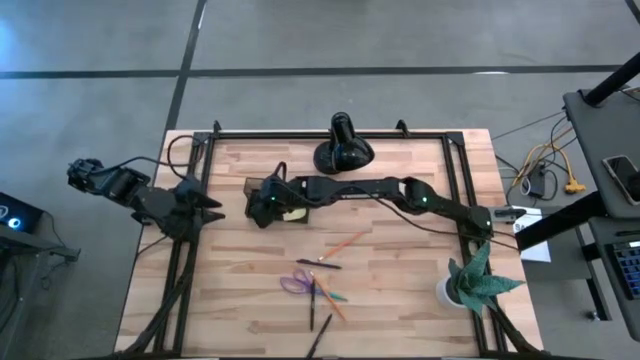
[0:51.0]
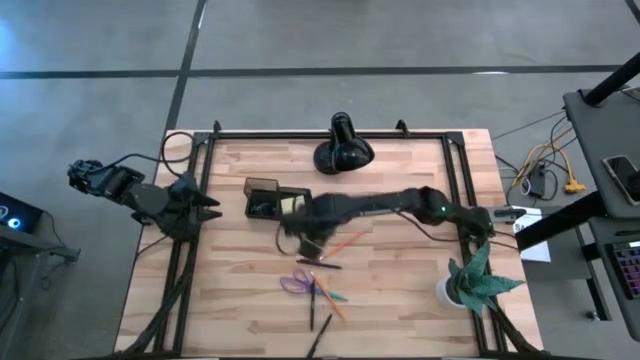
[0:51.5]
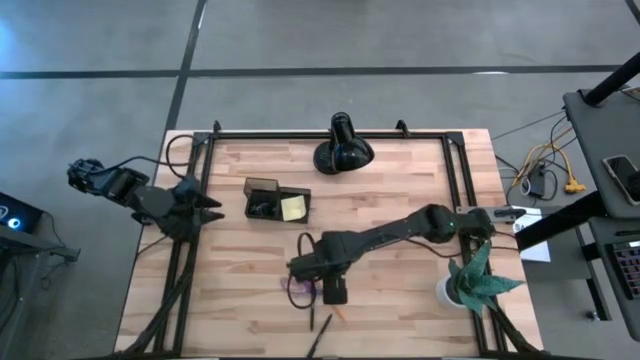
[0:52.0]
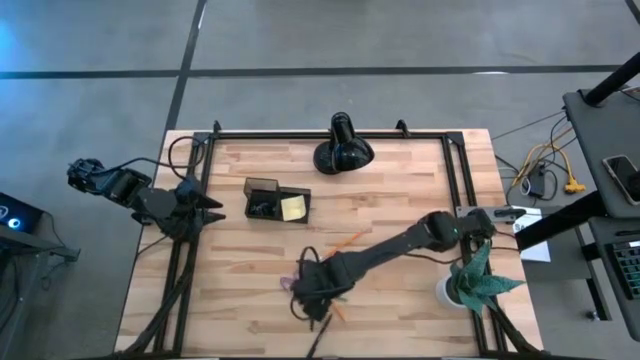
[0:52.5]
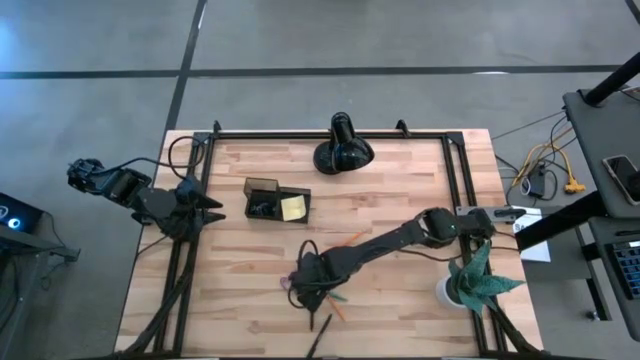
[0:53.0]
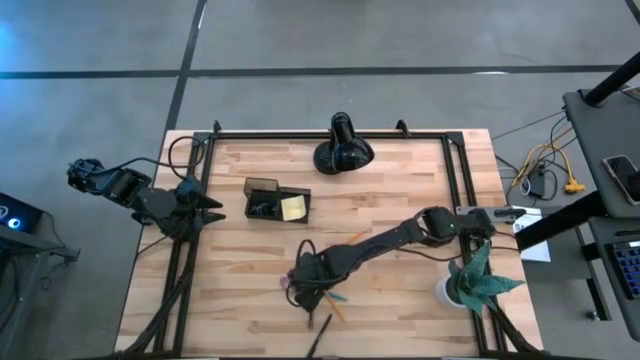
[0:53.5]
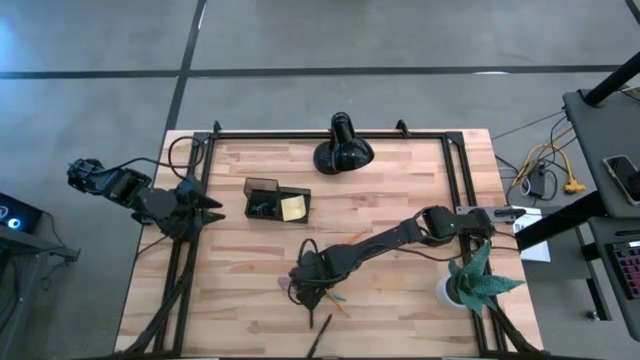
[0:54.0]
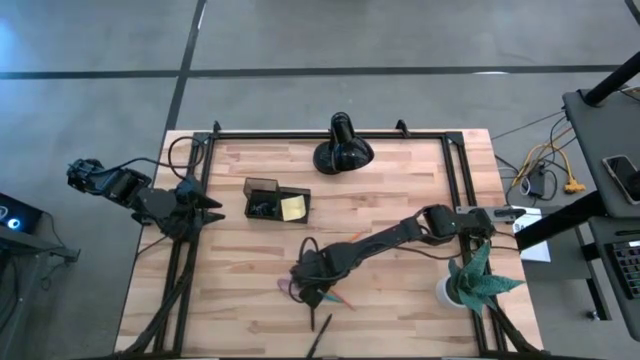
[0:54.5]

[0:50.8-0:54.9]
Task: Pick and place office supplies into organizer
Put the bottom yellow pencil into the black desk organizer

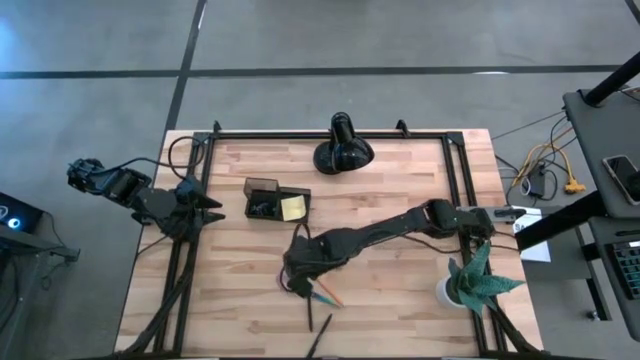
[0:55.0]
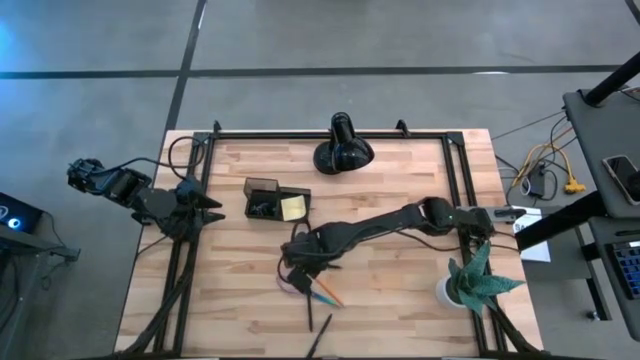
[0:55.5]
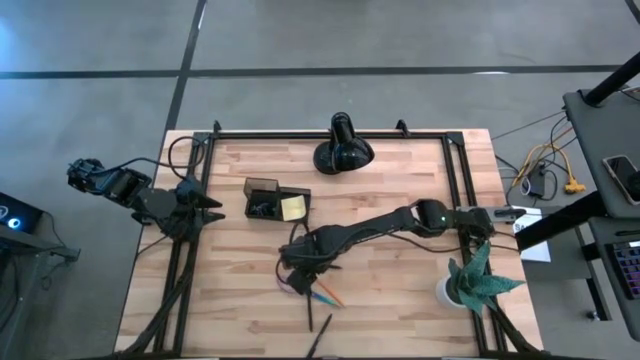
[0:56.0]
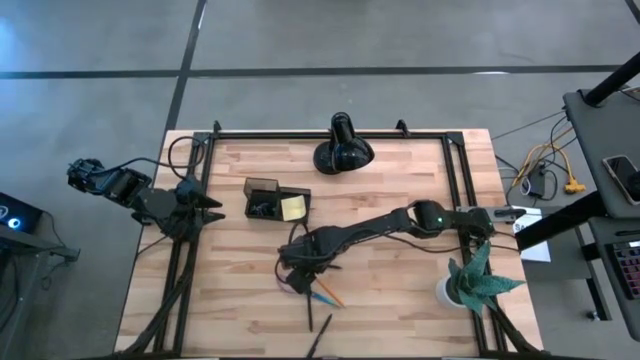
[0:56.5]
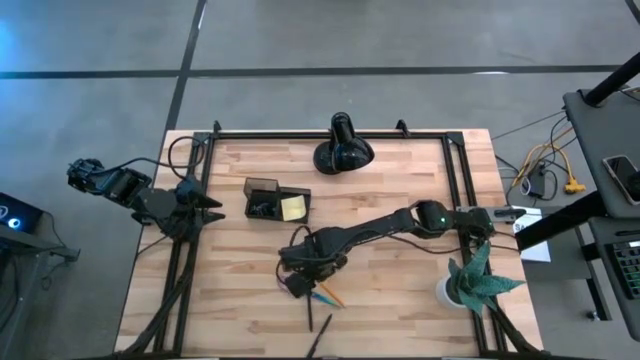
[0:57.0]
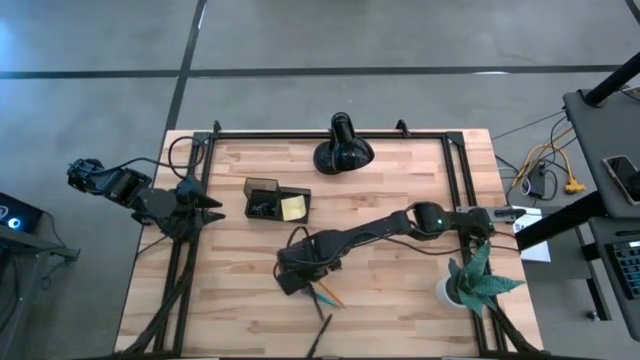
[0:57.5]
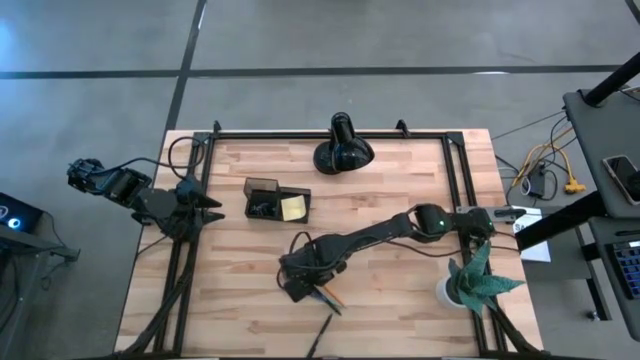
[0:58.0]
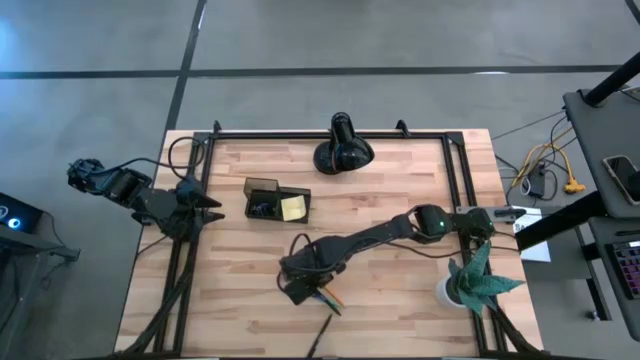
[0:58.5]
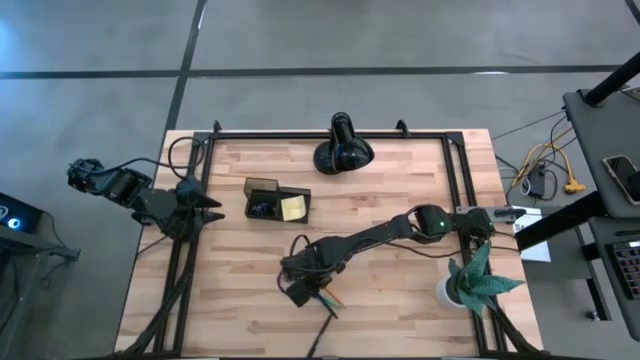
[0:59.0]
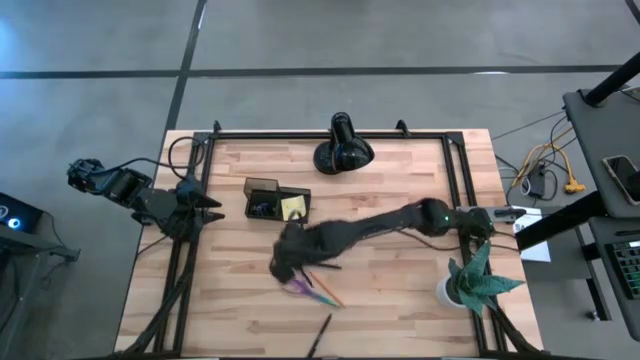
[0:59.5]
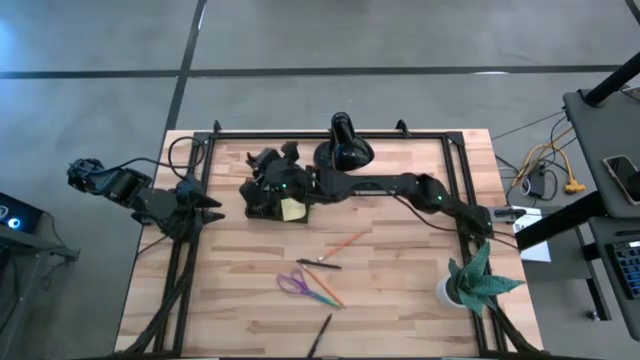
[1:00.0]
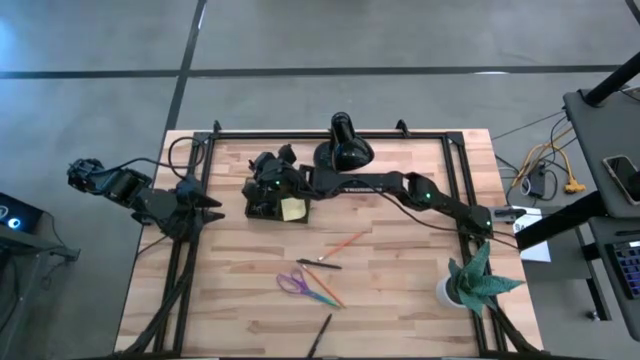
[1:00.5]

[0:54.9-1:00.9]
Put the middle black pen into the black desk organizer

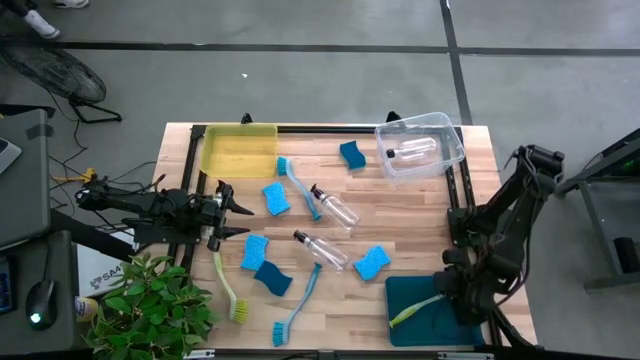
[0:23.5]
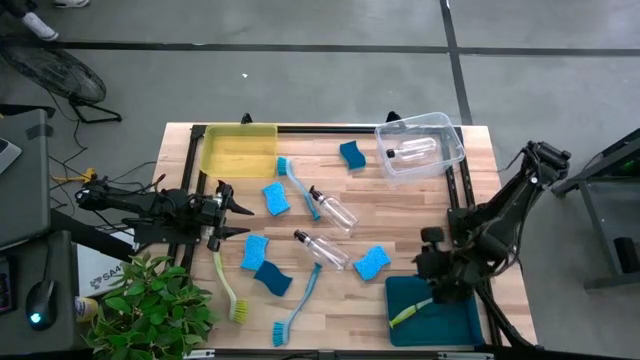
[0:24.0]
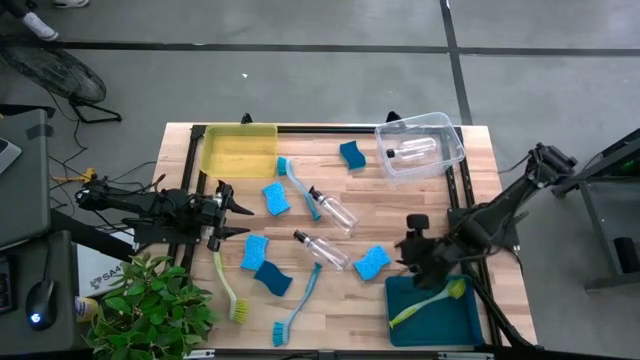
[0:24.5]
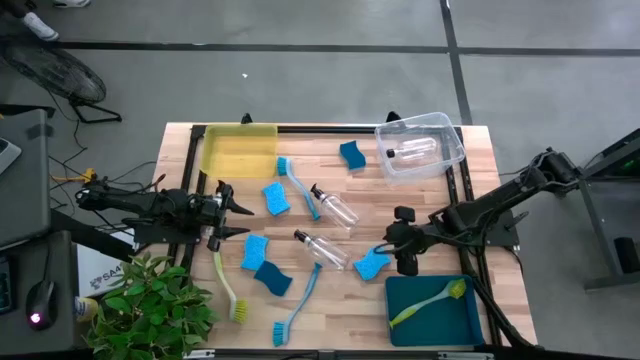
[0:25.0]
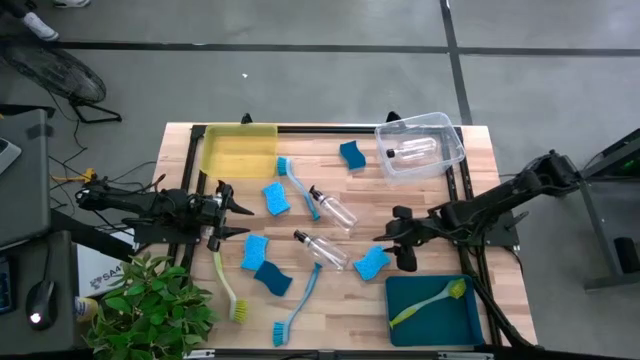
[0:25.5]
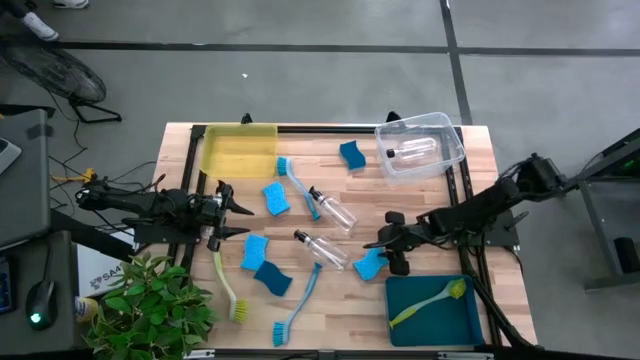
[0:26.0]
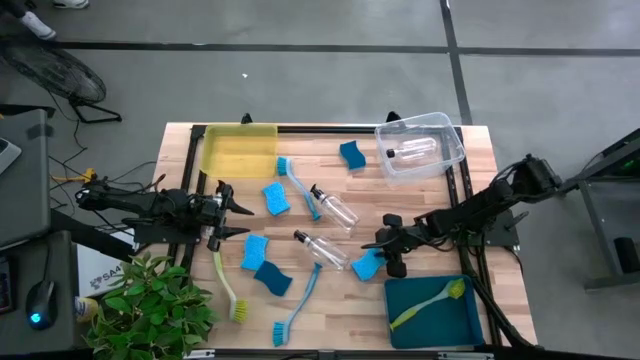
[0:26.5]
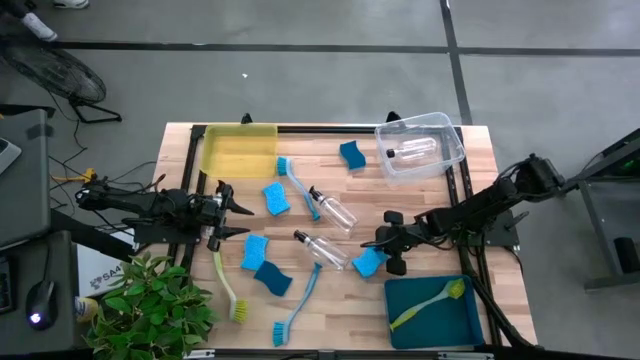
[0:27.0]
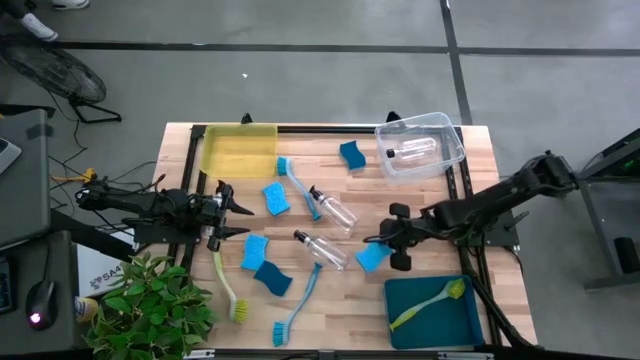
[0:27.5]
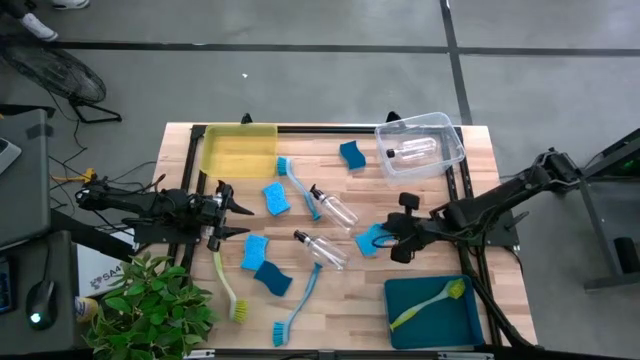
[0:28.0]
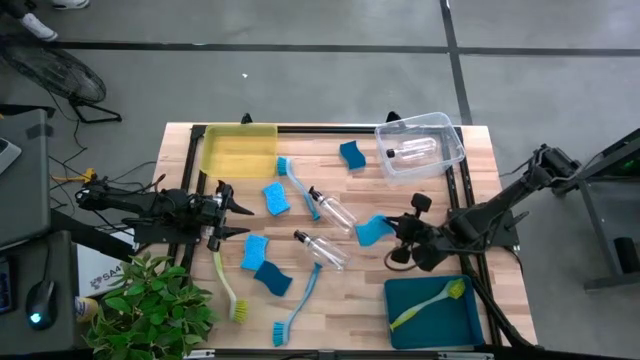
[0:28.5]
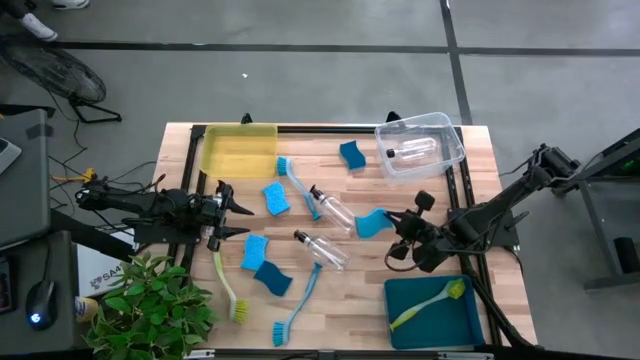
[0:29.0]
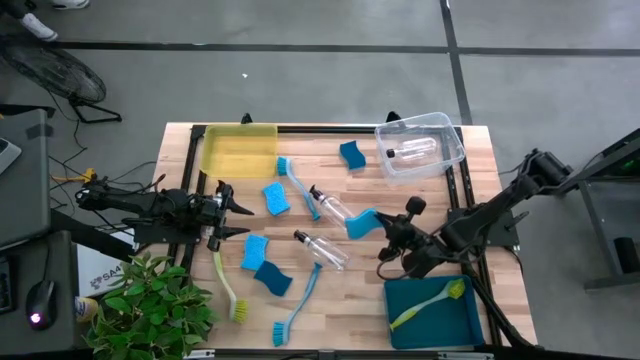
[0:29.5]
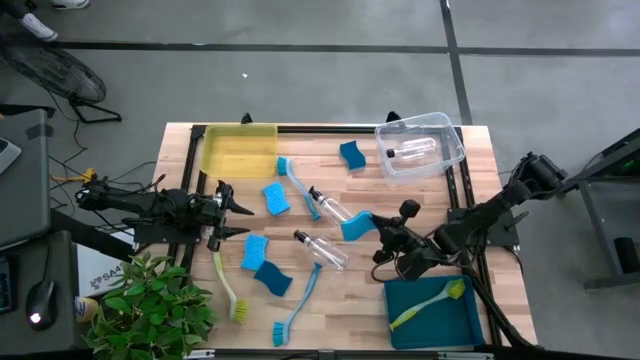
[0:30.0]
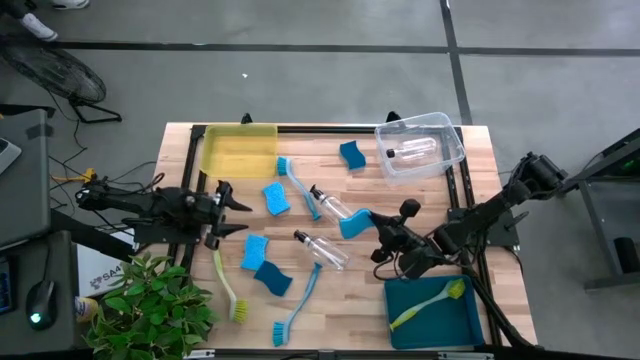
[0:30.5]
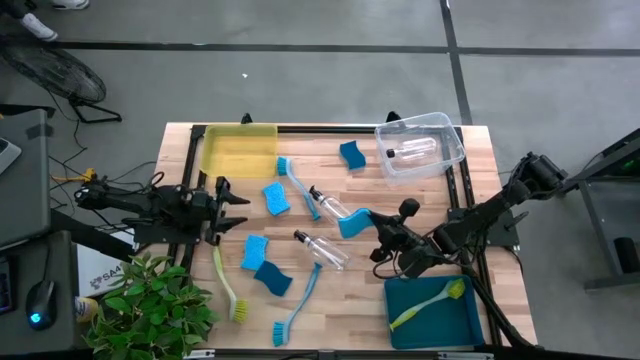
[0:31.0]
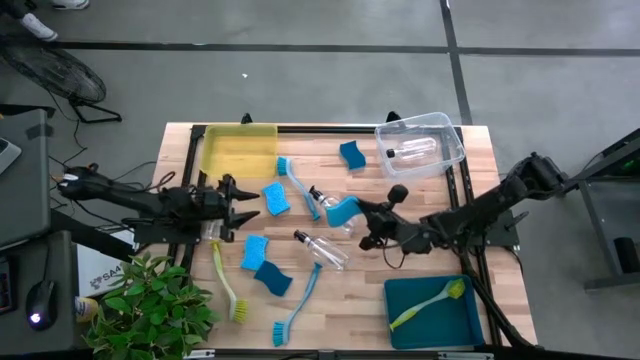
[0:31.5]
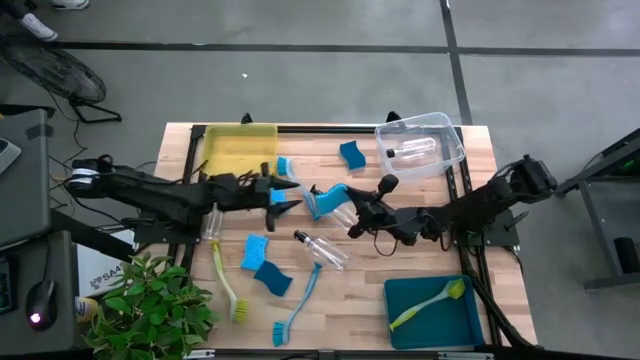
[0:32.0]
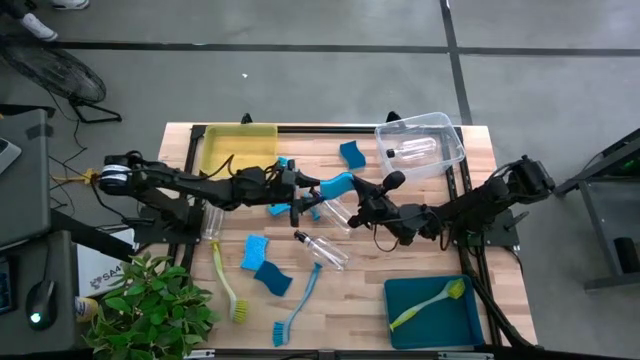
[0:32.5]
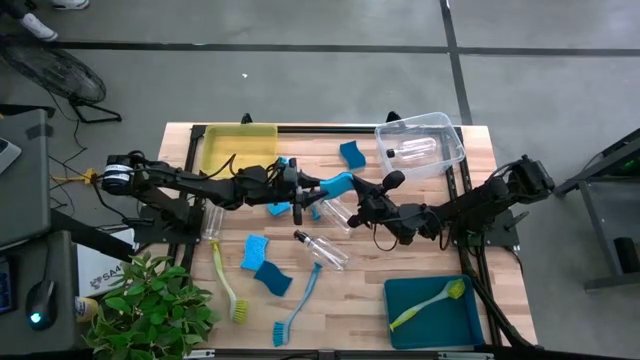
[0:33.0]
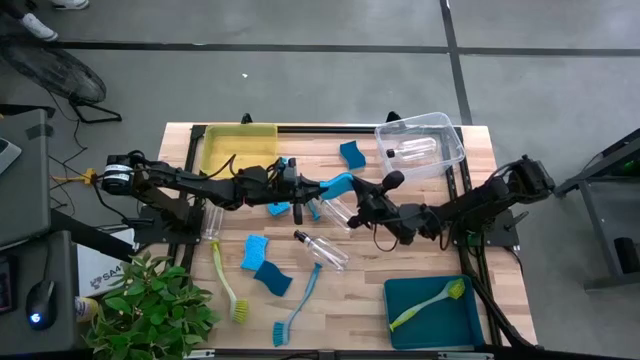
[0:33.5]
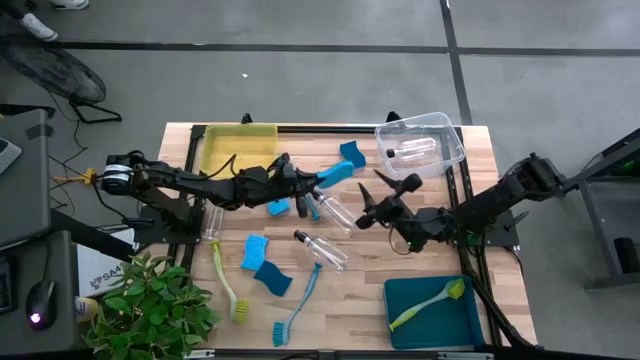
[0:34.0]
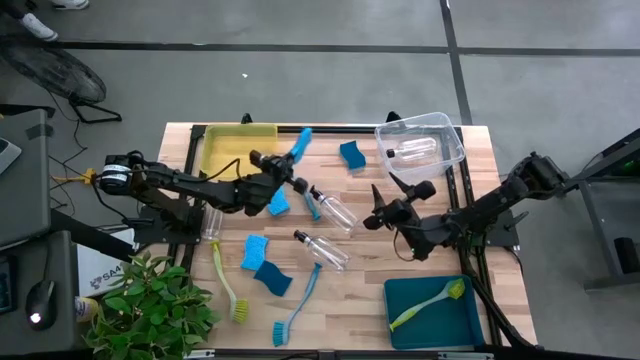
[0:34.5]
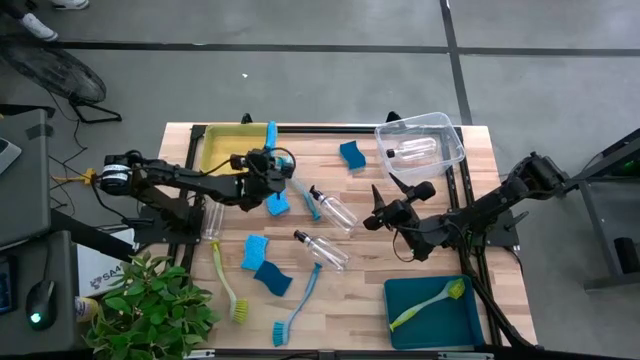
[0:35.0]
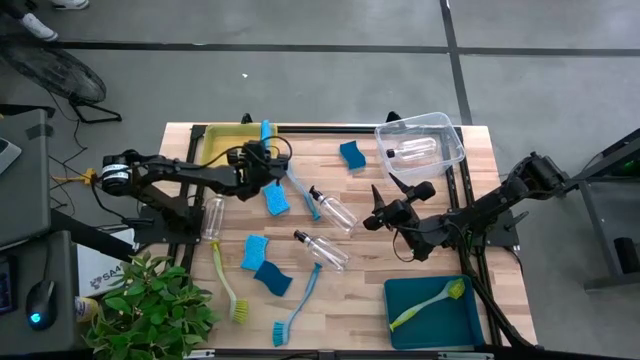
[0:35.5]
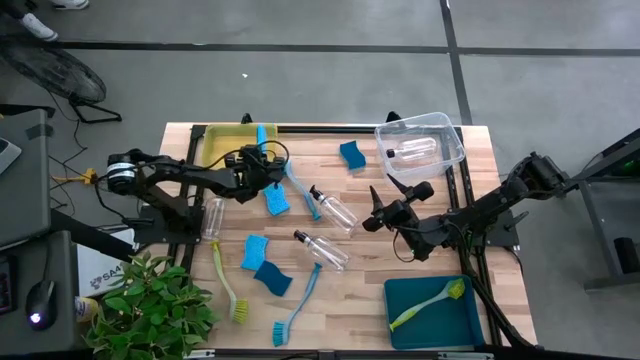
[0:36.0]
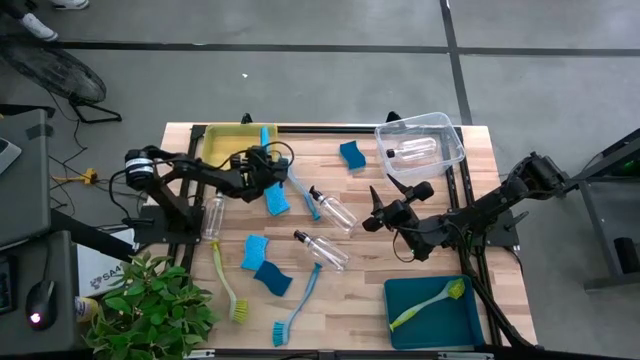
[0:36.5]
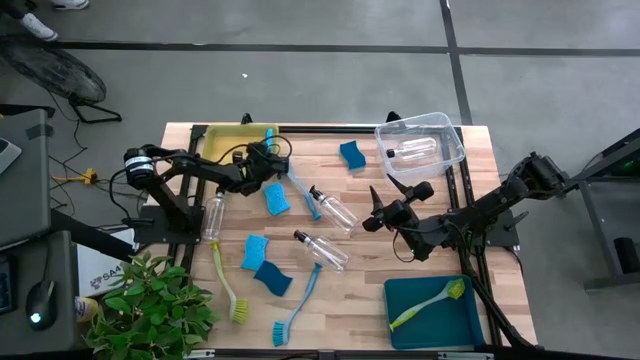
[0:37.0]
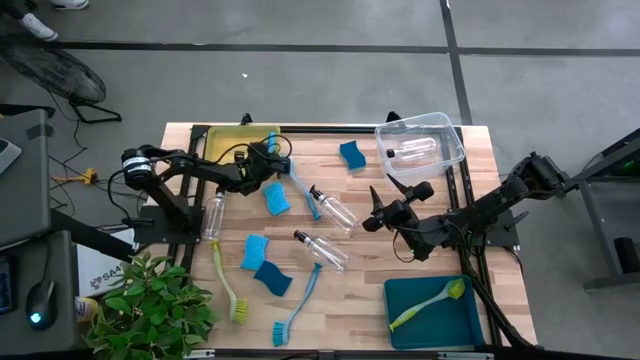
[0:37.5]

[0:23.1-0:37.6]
Task: Pick & Place Kitchen Sink Supplies
Put the blue sponge into the yellow bin
